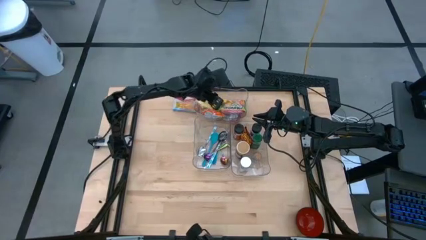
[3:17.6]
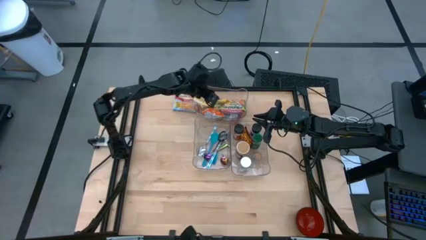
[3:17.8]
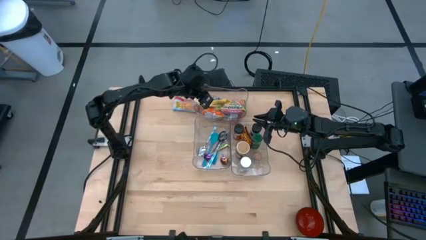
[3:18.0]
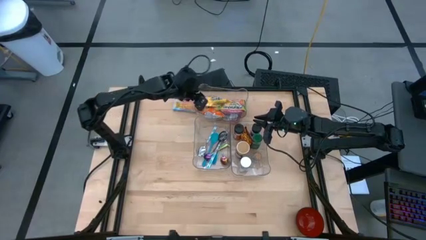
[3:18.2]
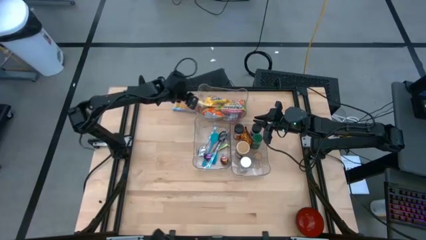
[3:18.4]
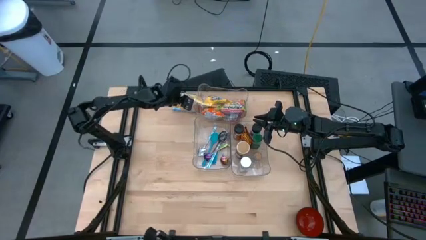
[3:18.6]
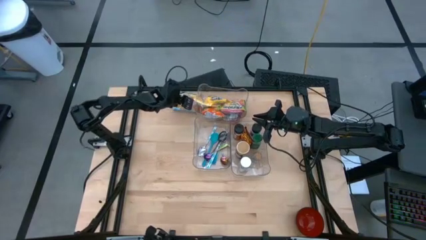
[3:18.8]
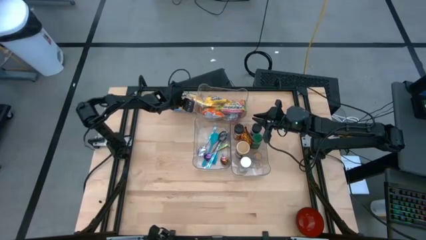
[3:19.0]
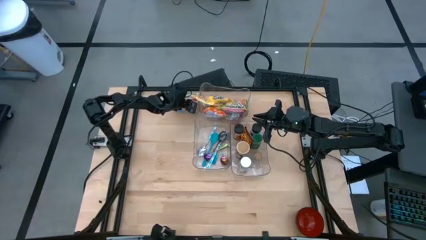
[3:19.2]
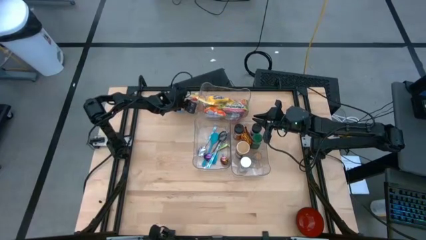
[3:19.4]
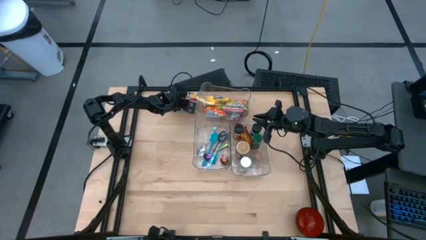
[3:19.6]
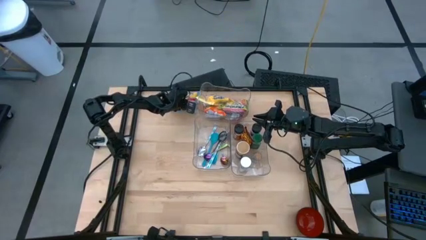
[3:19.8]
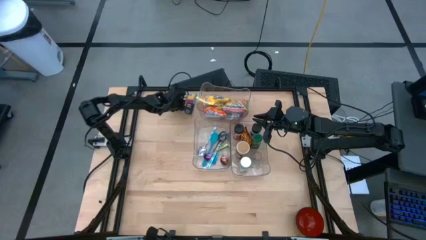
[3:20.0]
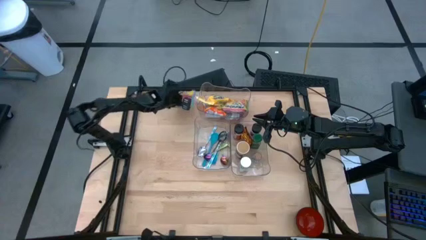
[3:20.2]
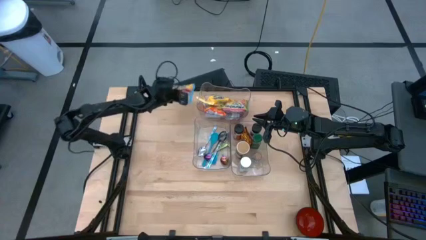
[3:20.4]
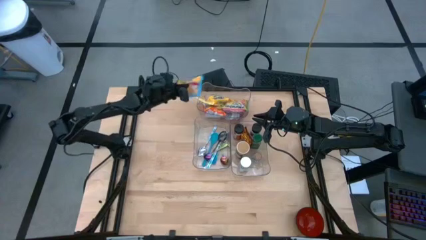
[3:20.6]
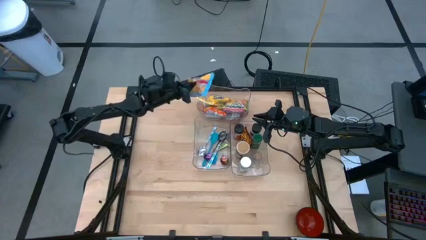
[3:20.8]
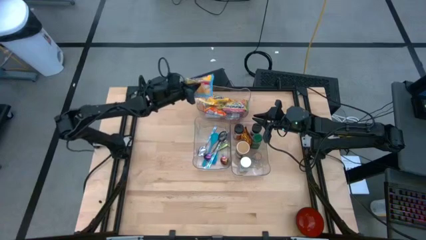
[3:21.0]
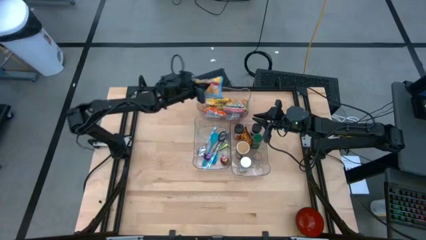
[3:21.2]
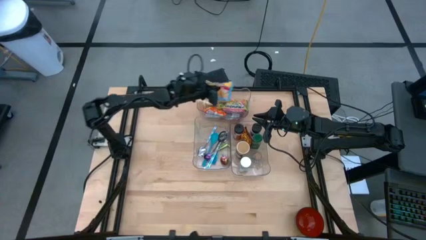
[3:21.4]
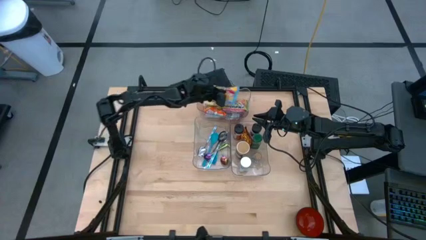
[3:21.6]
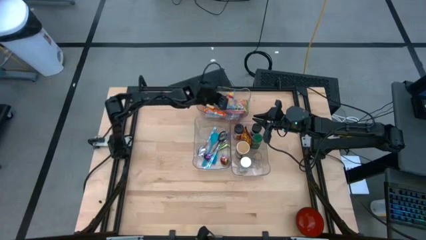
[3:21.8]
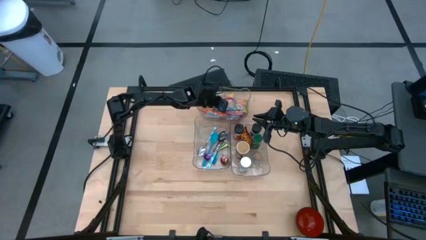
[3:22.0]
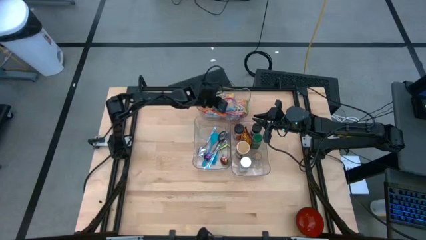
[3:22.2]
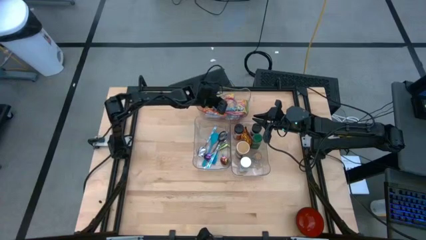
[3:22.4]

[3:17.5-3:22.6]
Task: Pick & Place Food Item
Put the blue noodle pack into the top transparent bin

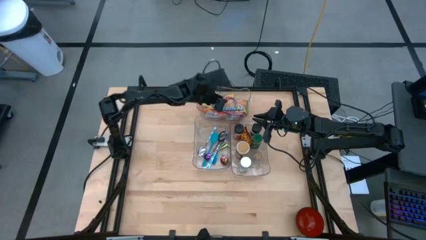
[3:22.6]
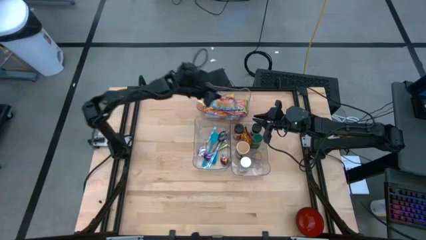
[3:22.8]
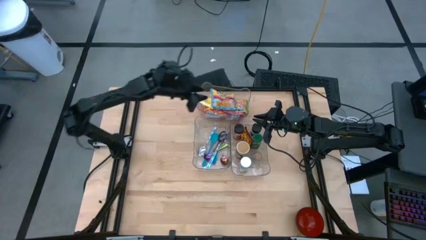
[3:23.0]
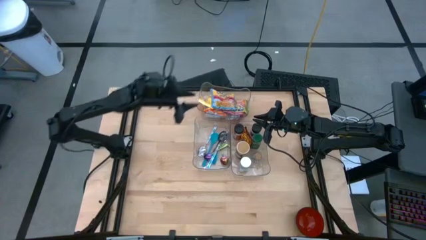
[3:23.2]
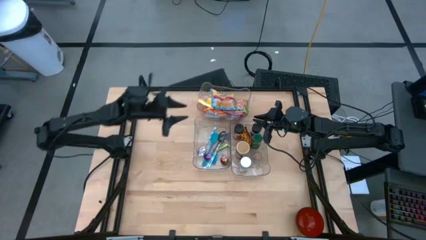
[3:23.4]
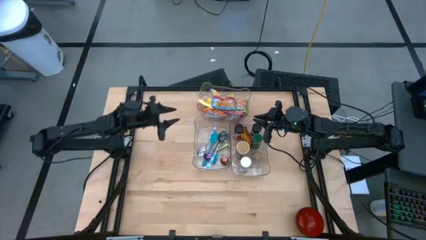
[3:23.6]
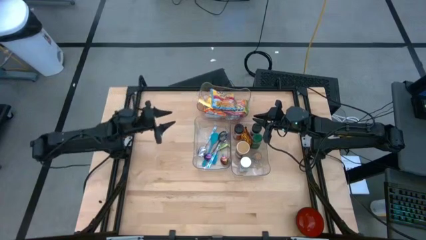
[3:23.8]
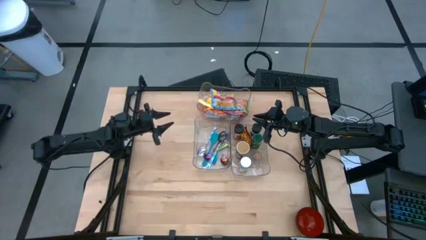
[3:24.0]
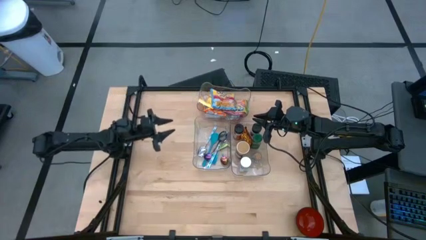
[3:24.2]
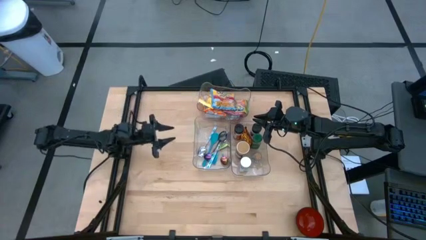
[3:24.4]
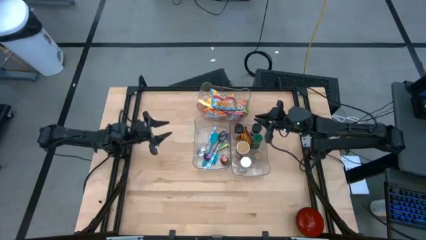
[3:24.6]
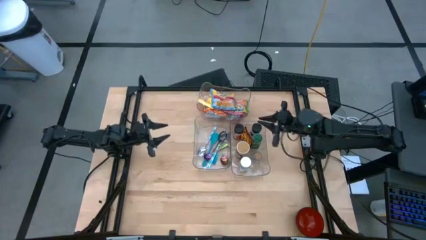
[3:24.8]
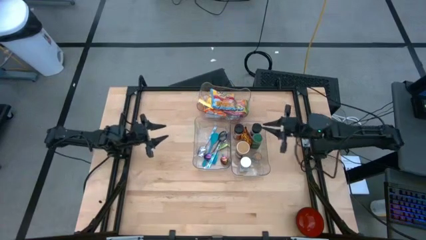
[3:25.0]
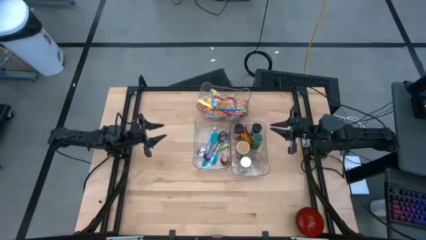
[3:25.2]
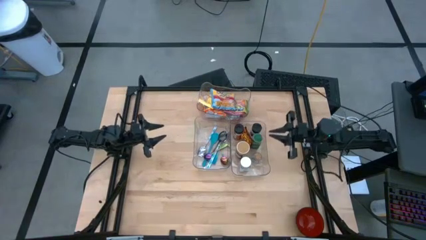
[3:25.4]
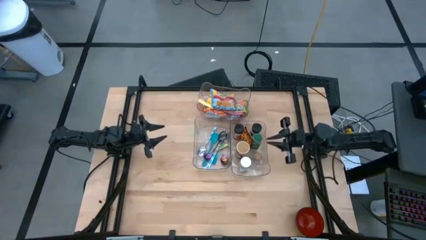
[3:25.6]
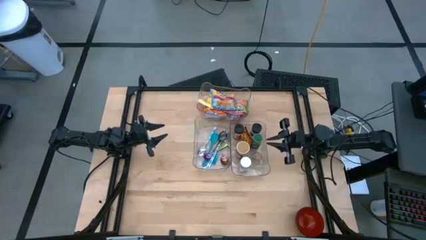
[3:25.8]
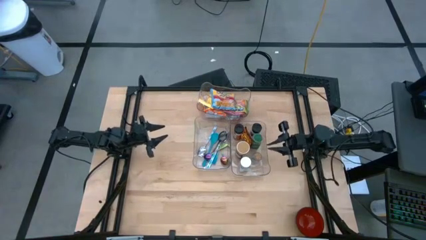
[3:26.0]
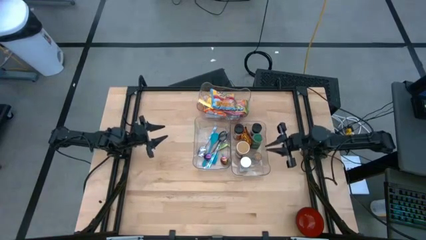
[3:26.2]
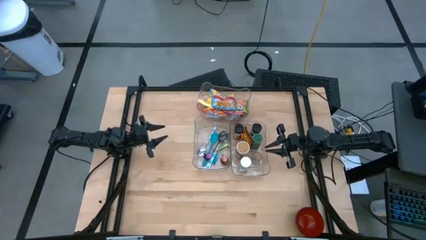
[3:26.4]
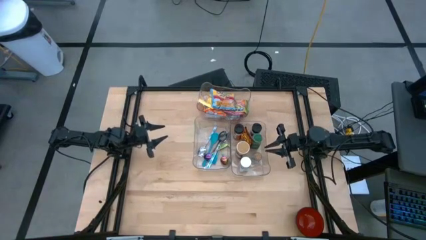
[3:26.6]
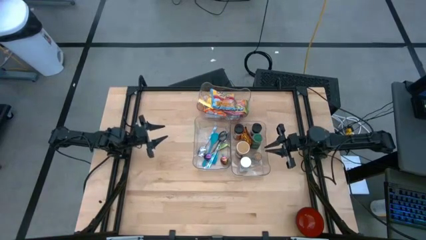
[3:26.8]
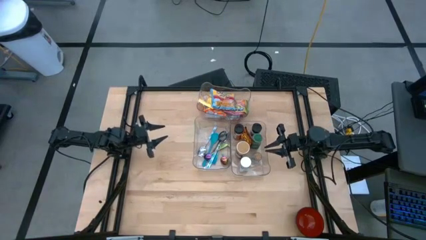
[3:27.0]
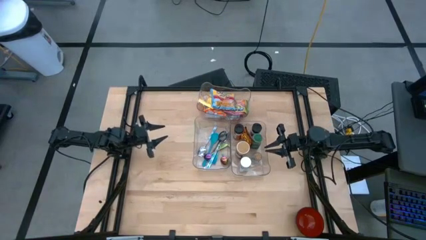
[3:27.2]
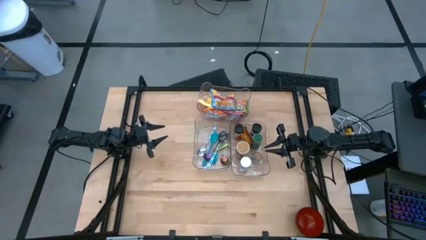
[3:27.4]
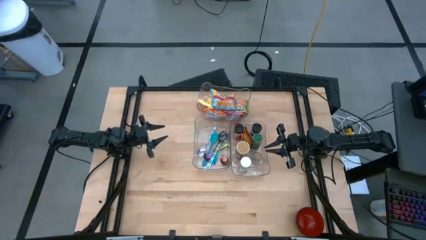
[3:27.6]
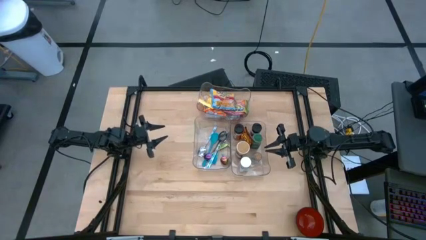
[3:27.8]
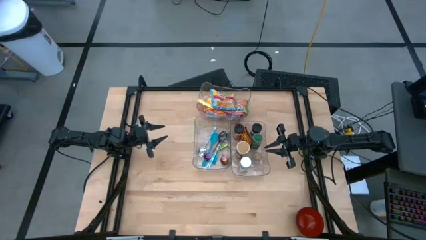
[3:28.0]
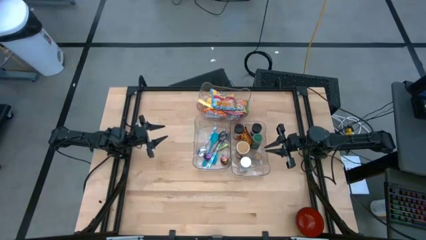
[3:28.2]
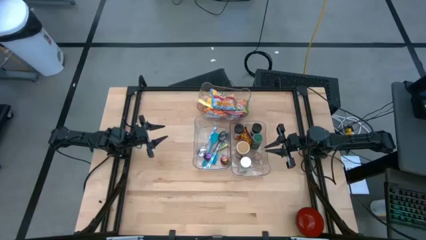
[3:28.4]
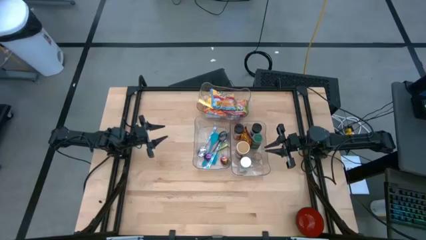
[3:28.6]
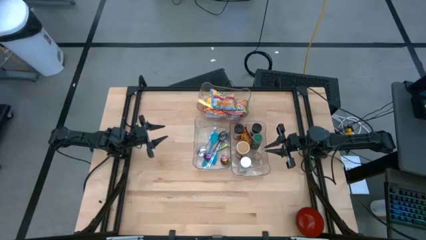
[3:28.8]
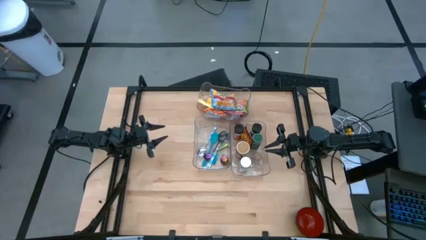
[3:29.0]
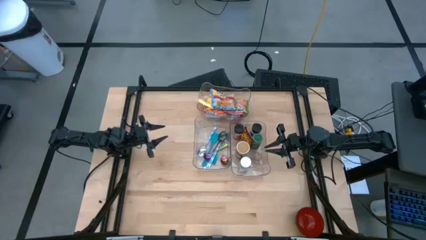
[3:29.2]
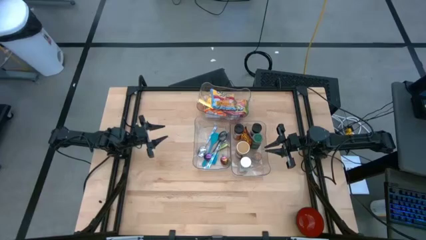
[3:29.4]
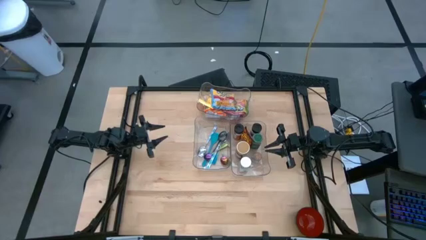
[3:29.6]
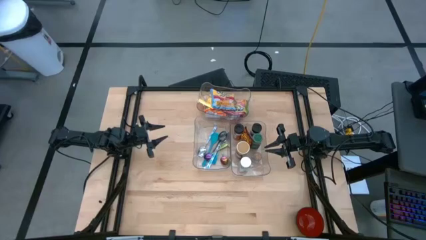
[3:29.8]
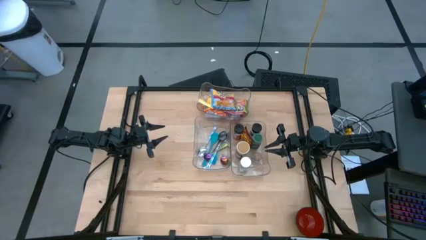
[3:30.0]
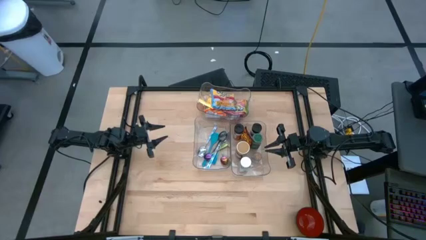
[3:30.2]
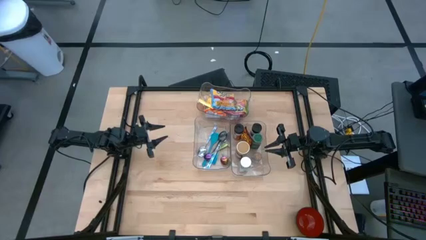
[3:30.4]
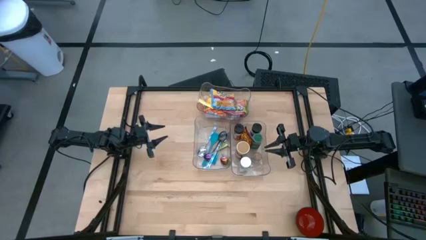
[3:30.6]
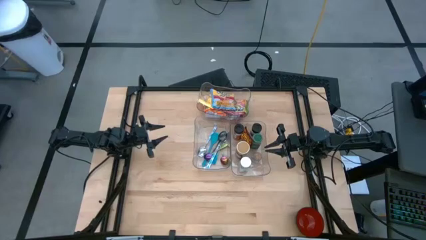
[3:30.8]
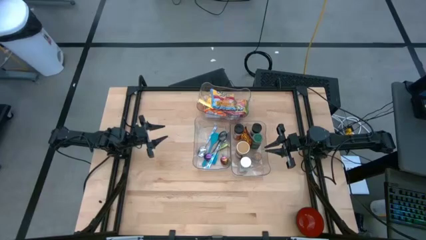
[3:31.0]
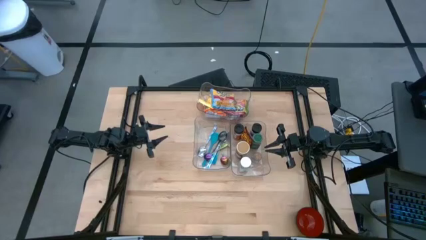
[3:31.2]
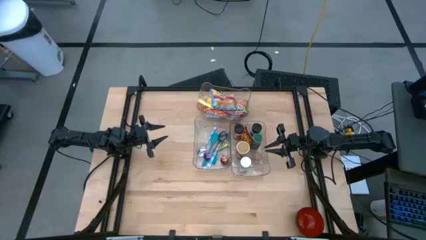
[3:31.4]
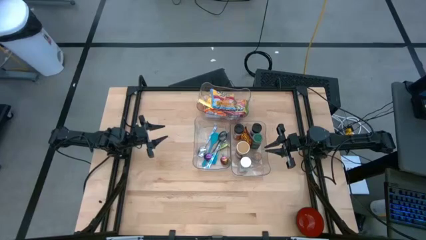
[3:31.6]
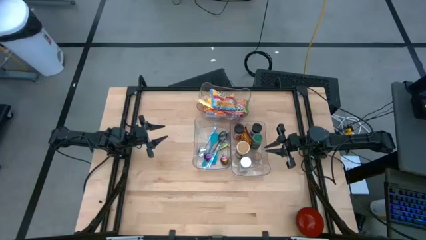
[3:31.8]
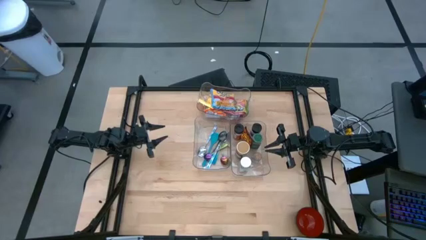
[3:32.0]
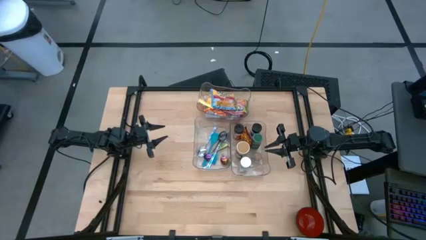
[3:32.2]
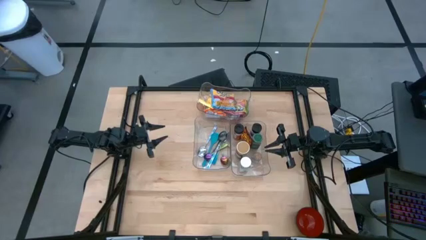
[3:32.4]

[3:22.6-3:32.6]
Return to Home Position

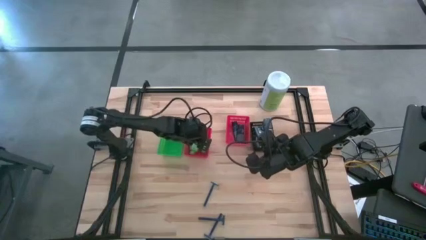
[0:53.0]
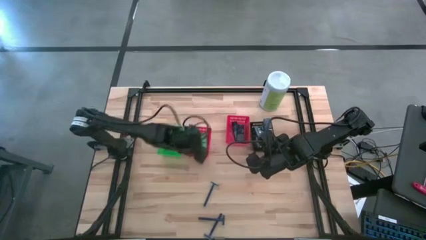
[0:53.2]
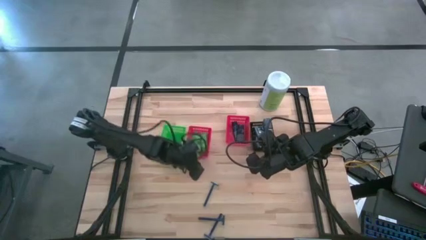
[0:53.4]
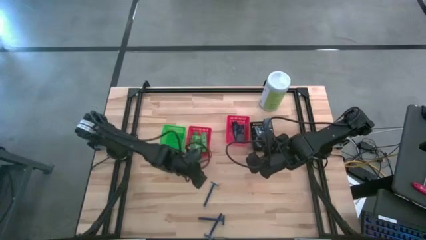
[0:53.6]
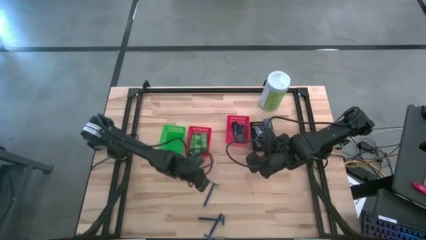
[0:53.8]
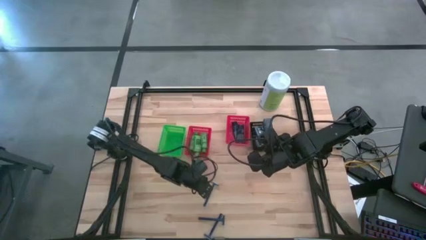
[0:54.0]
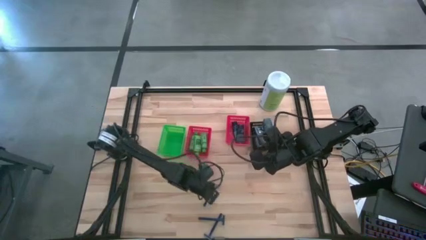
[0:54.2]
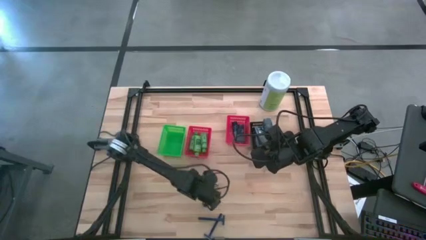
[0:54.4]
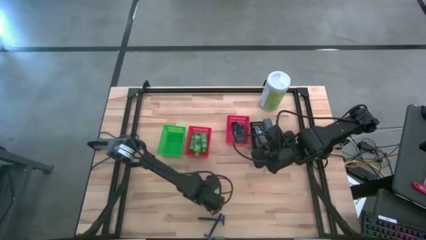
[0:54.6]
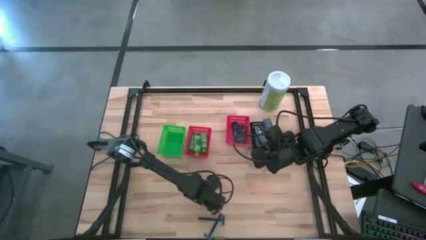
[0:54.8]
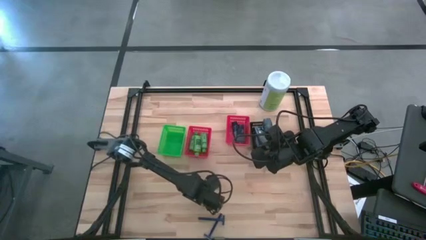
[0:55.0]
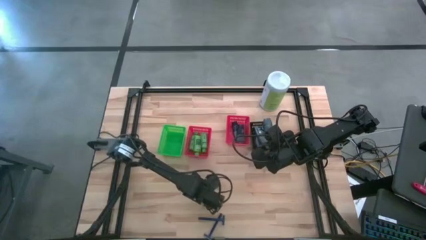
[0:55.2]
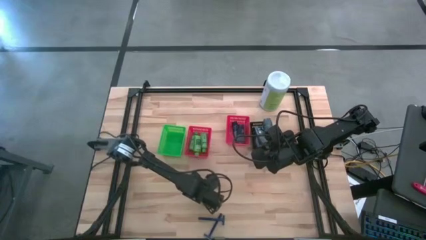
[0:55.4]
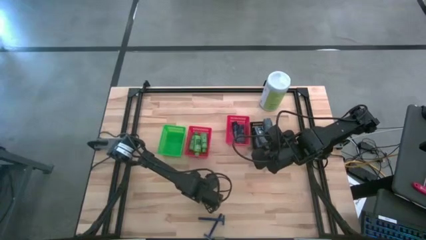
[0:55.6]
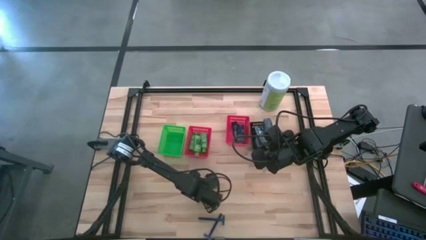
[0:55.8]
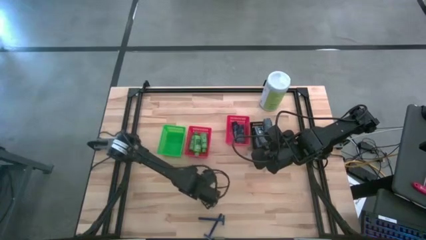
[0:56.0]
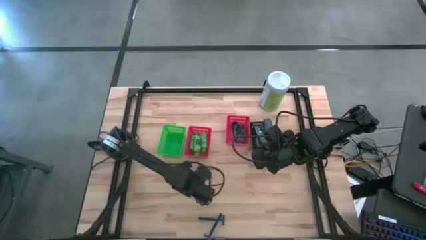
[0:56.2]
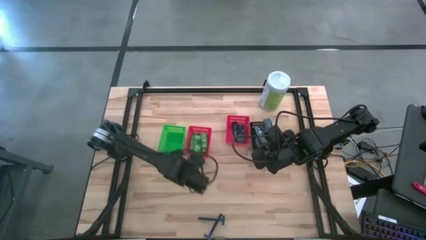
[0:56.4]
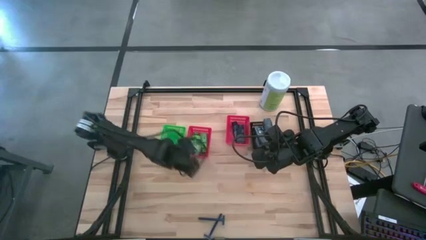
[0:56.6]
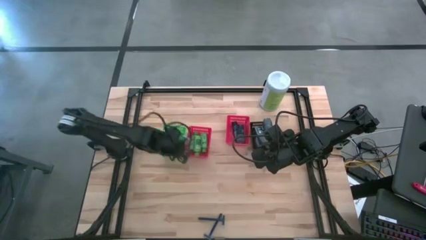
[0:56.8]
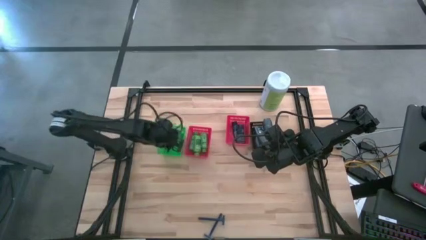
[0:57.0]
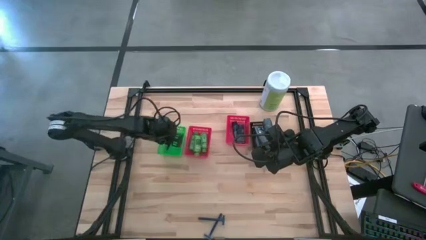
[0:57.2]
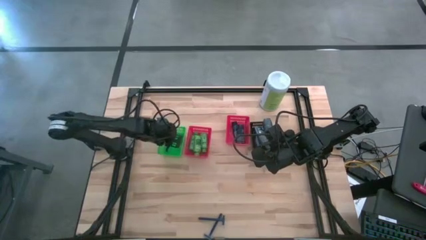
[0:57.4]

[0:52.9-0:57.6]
Task: Pick & Place Travel size toiletries
Put the blue razor into the green basket
